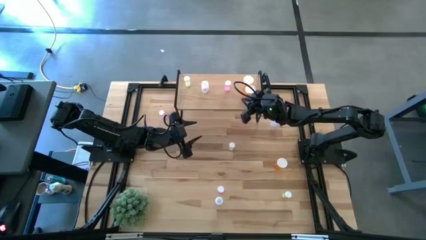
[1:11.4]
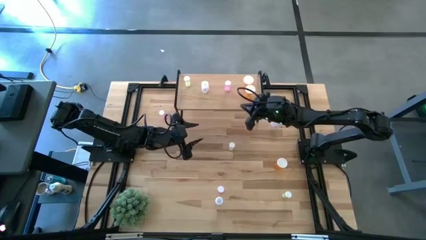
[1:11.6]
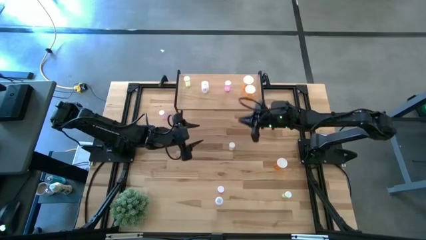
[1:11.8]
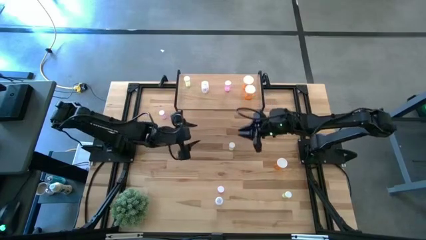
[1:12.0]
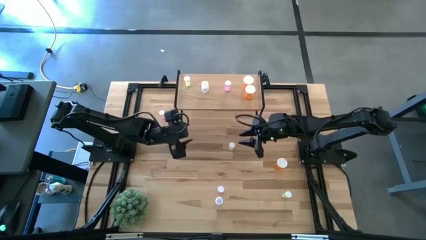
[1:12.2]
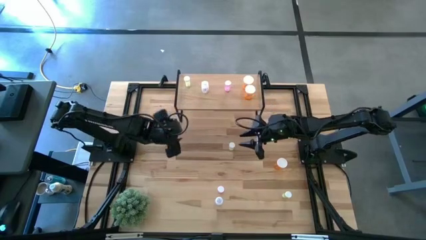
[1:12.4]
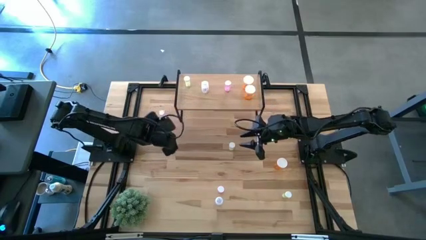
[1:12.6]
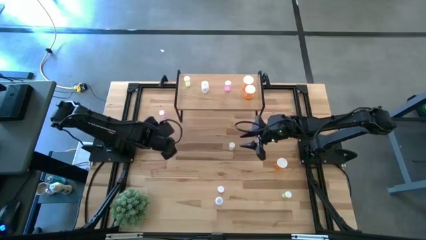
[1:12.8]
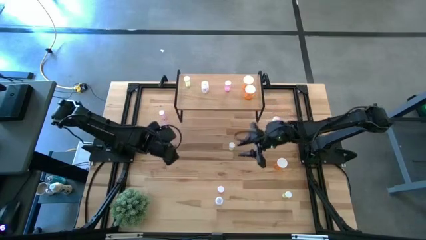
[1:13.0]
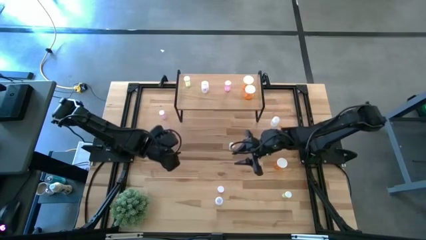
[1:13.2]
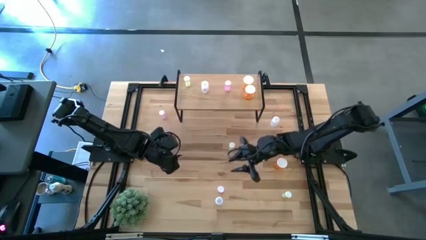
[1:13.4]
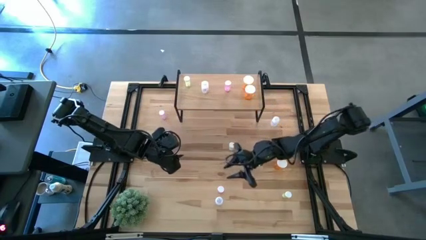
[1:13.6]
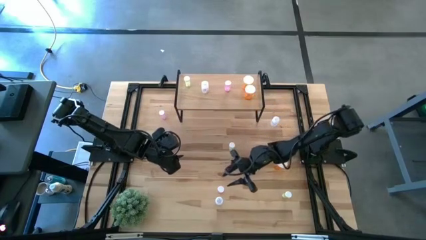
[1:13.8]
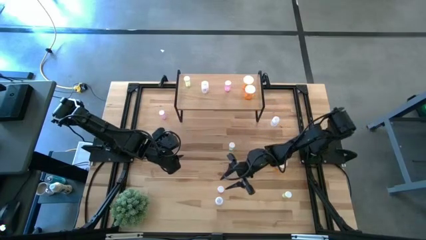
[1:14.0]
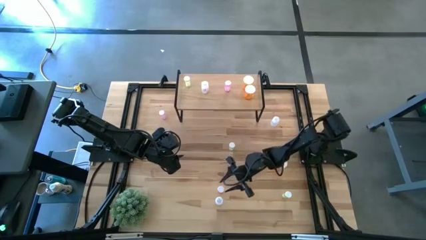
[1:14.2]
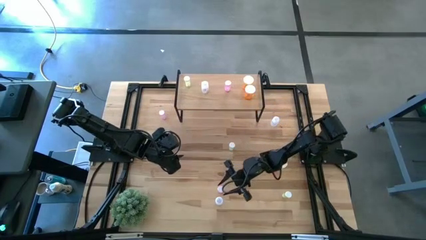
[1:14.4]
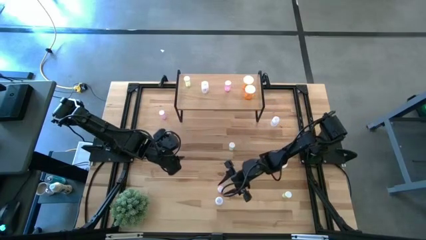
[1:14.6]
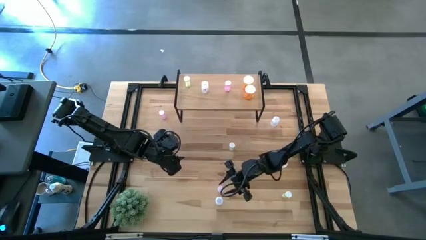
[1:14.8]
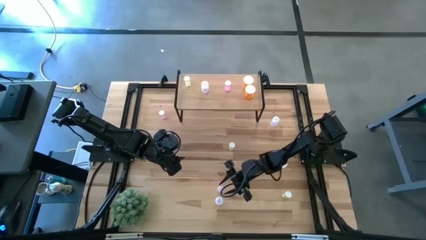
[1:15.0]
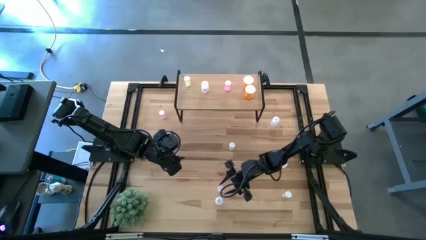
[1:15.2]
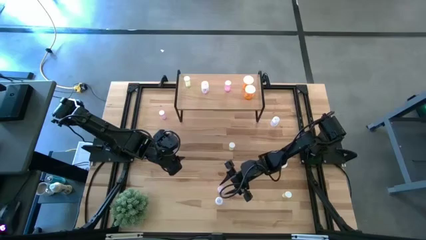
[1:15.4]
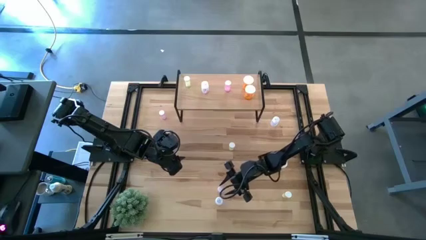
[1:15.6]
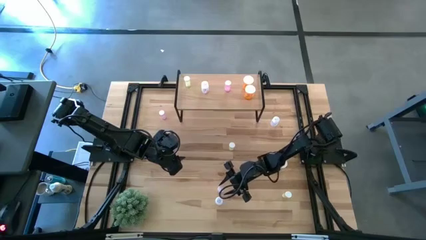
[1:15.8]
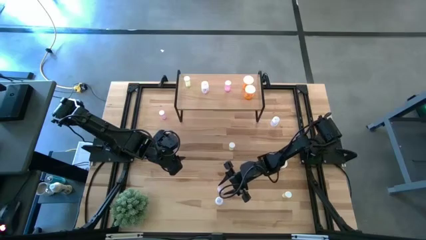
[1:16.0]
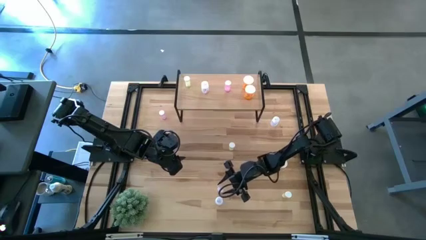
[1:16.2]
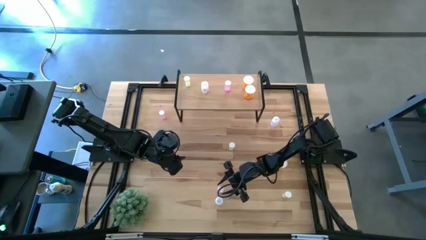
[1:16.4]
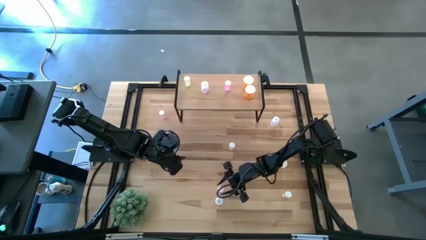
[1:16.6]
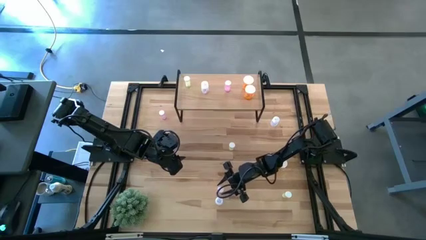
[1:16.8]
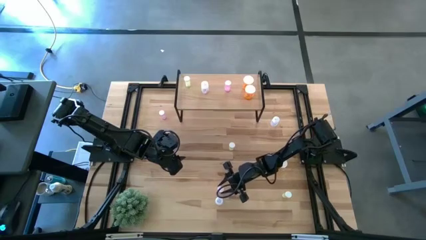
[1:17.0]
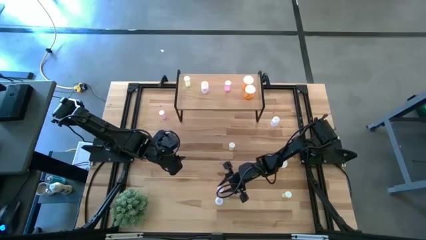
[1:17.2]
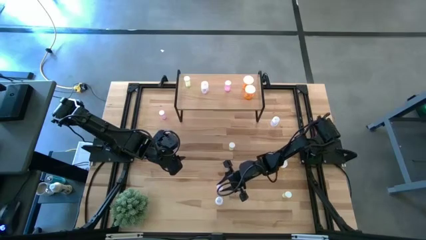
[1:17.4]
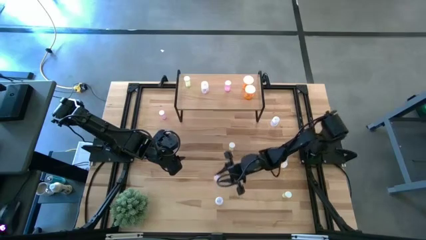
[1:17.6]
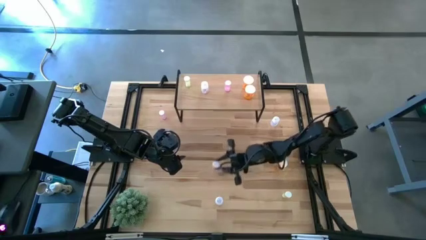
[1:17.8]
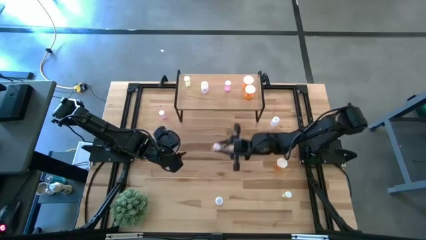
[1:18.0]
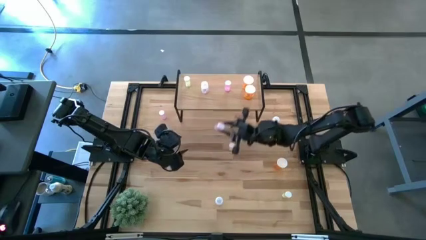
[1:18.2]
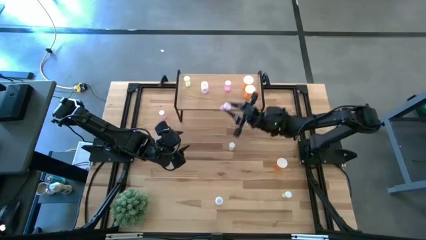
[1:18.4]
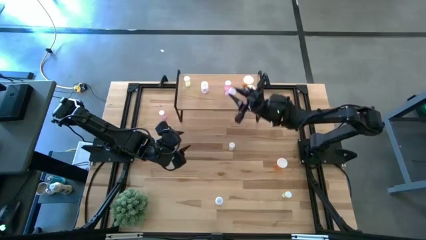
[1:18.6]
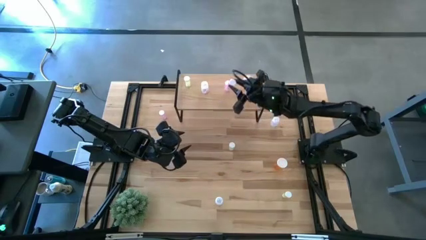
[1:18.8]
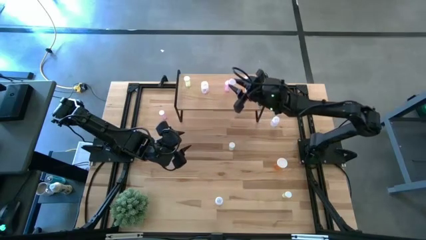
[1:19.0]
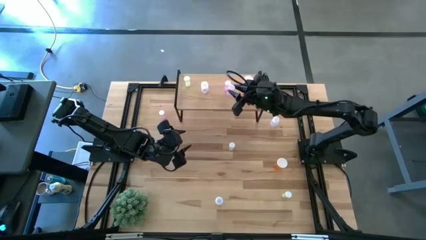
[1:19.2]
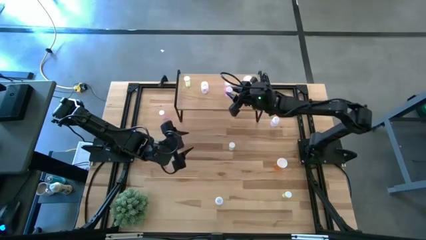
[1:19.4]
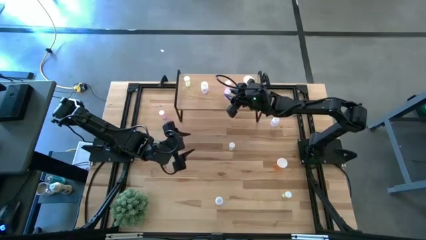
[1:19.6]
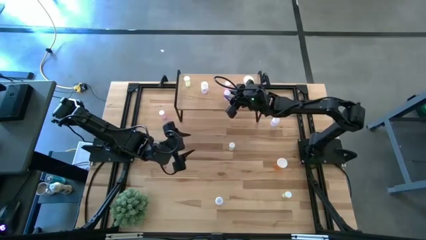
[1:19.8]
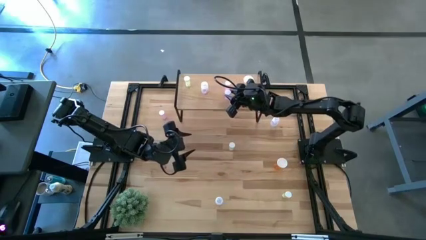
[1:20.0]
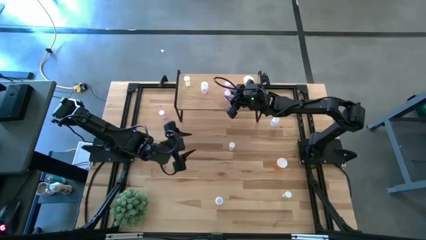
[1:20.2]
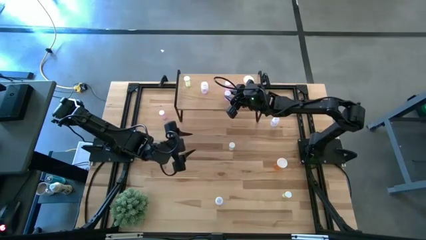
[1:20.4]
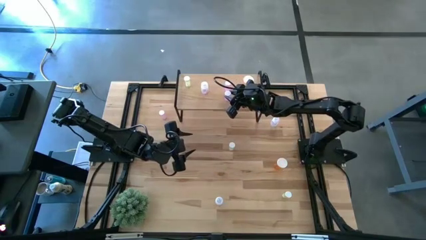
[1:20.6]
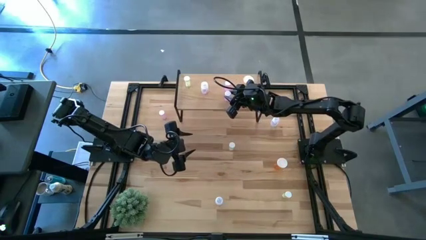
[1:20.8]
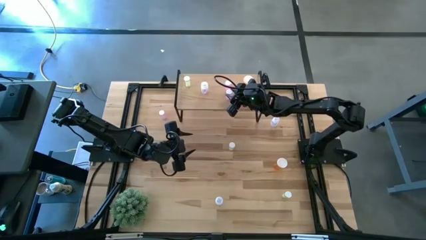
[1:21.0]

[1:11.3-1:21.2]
Task: Pick and place medicine bottles onto shelf by color
Put the bottom pink pill bottle aligned with the other pink pill bottle on the shelf

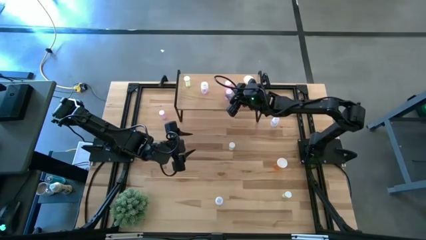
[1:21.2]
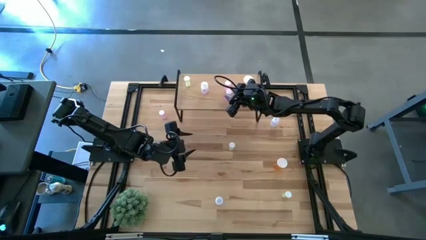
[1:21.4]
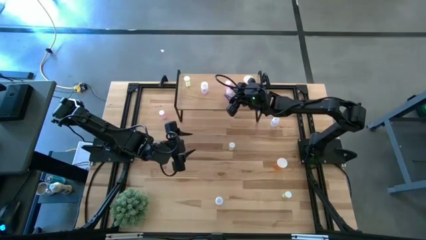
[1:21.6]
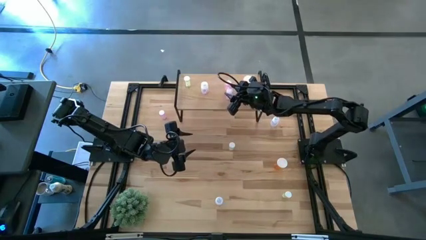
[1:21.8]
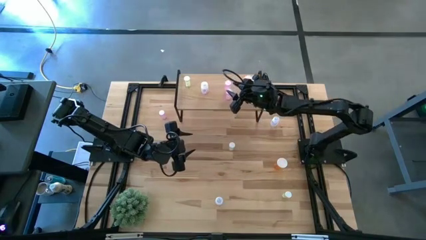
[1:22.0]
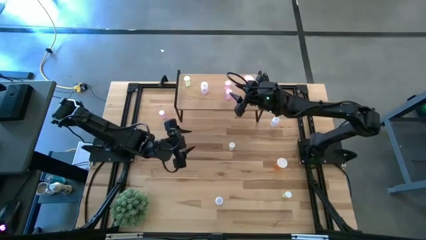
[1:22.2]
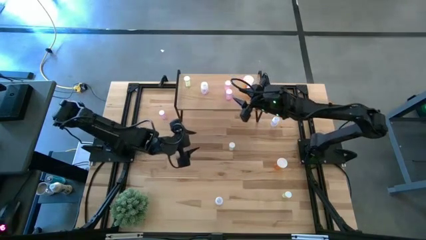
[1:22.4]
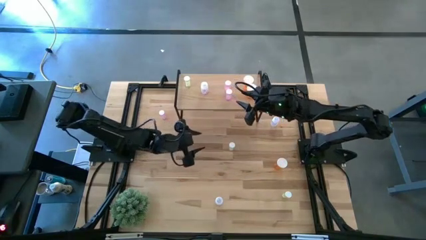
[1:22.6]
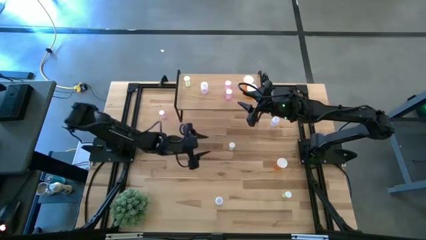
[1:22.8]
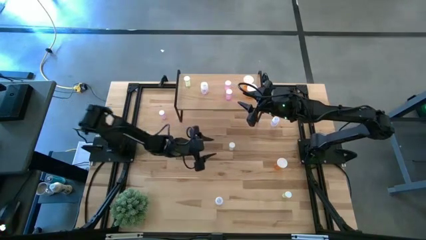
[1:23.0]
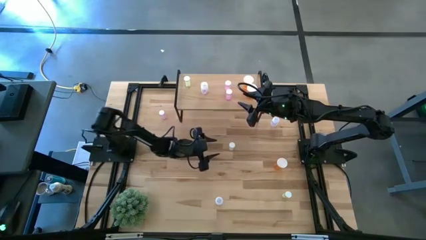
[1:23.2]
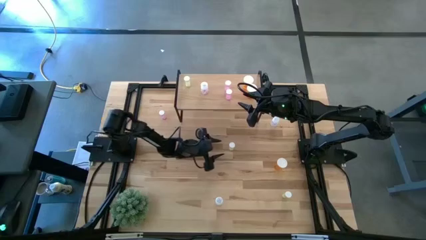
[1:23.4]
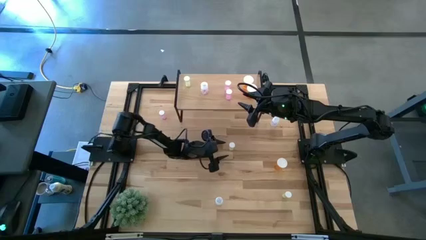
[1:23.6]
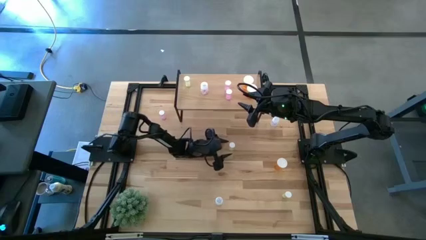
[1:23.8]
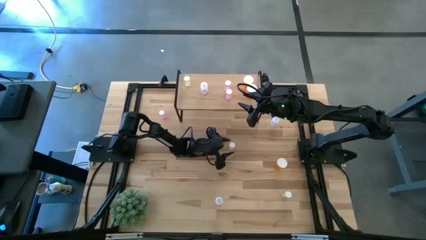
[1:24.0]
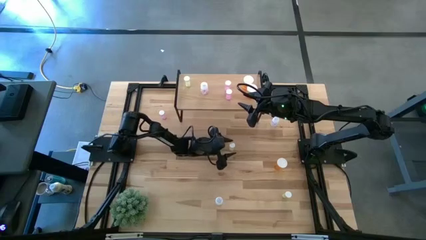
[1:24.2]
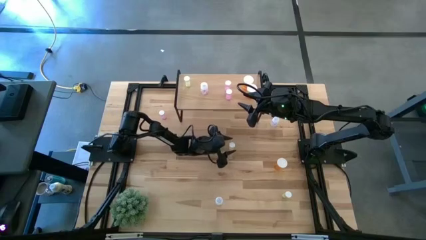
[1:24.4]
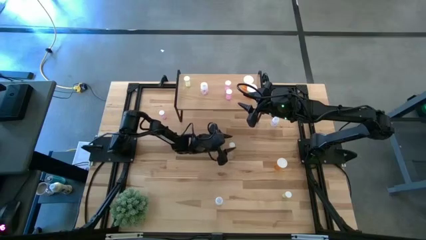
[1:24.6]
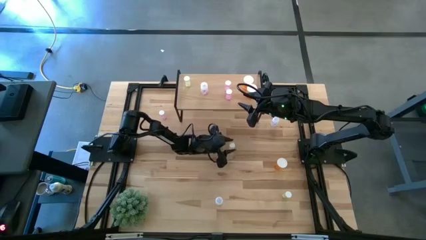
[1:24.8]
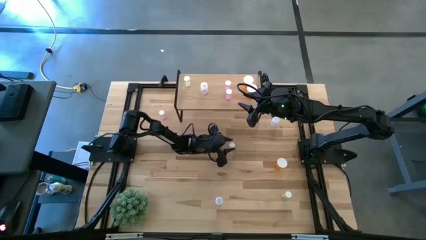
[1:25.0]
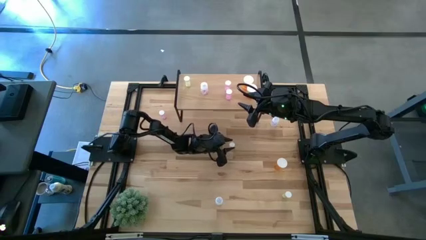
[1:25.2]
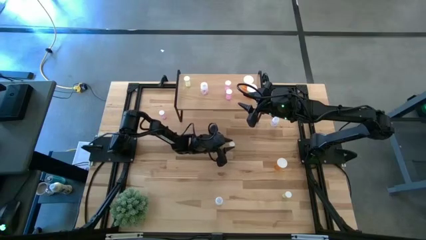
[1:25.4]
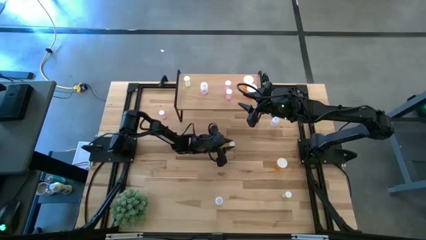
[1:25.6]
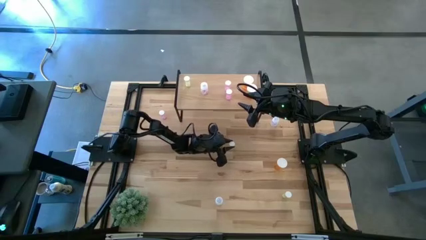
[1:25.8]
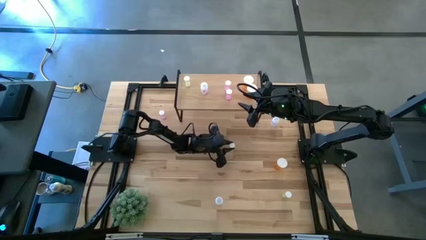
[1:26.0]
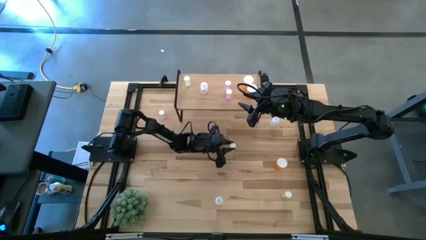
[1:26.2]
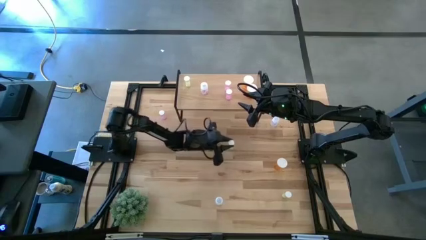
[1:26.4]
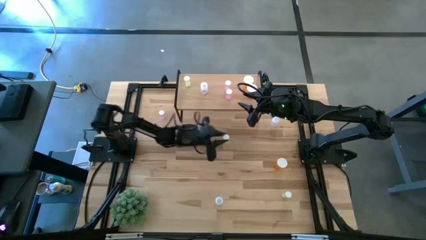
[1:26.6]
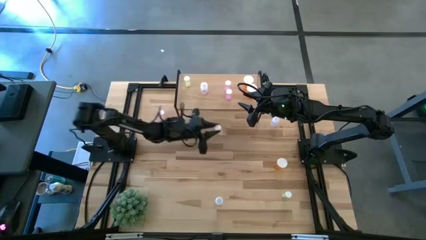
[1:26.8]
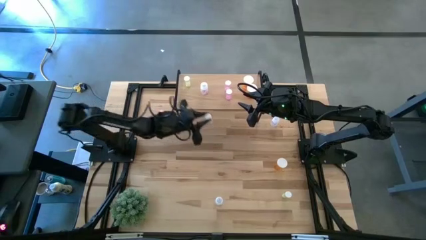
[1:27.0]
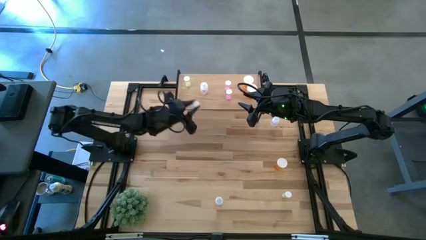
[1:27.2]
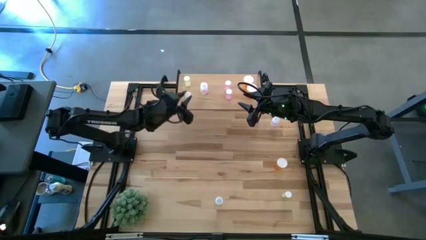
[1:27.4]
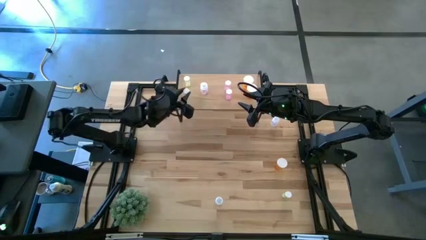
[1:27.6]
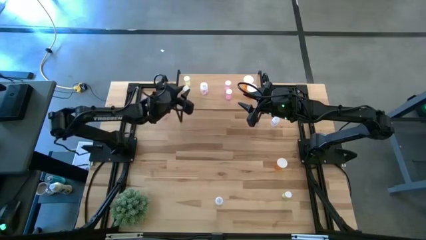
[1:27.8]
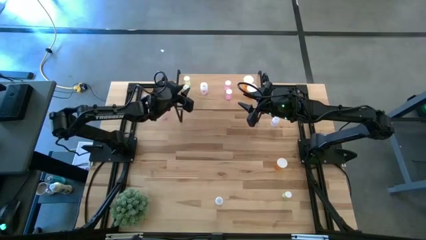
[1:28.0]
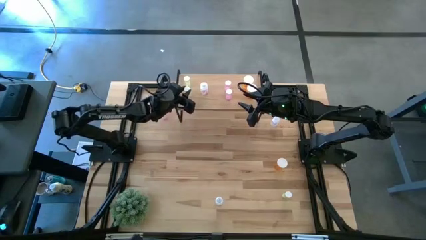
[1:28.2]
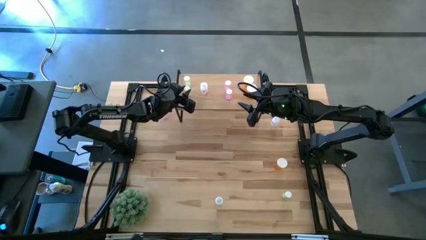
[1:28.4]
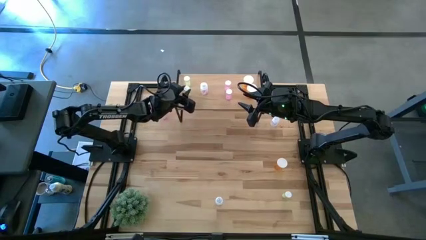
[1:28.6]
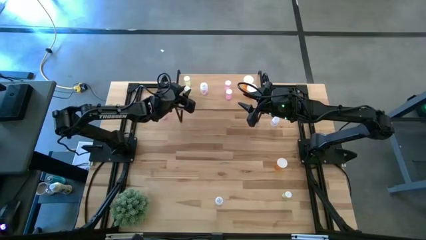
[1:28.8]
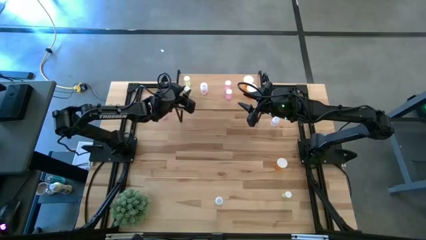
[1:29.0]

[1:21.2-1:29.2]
Put the top yellow pill bottle aligned with the other yellow pill bottle on the shelf
